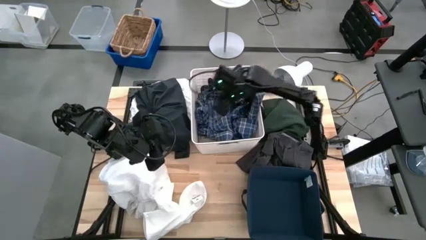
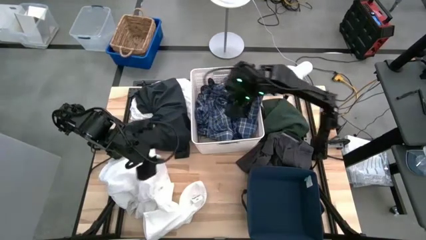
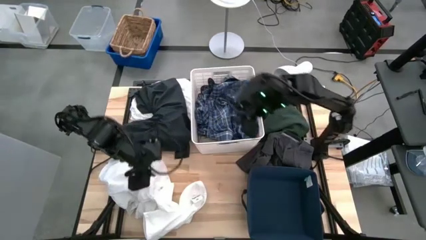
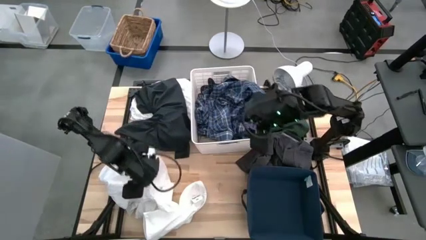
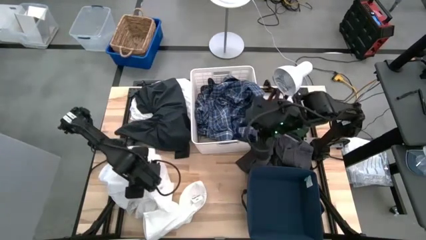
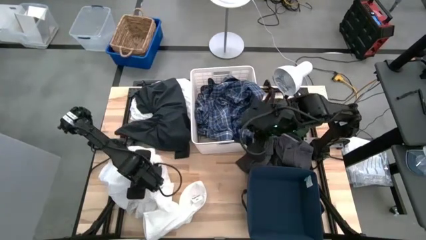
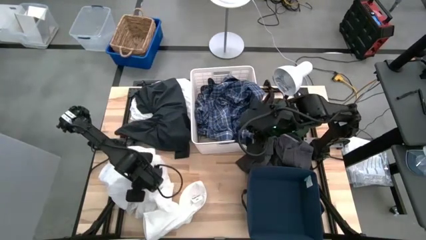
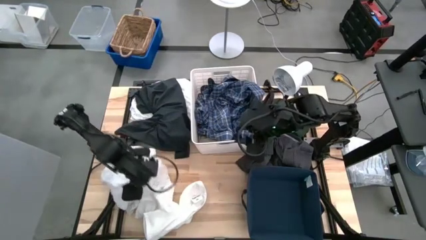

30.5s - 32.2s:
Task: Sort clothes
Put the white long sleeve polo into the blue laundry bin

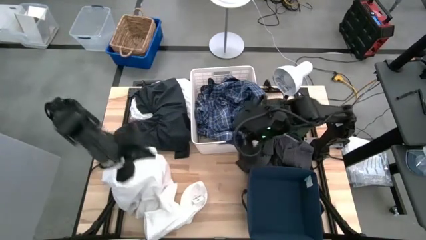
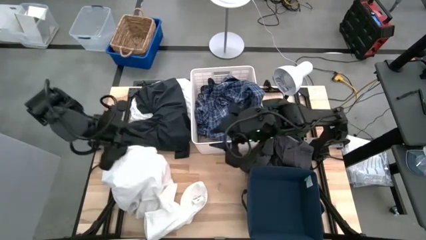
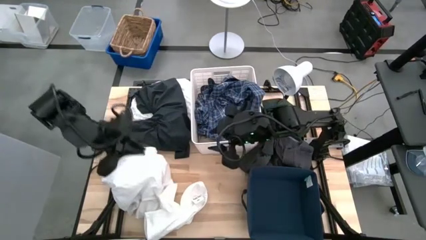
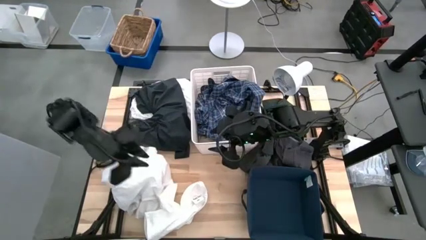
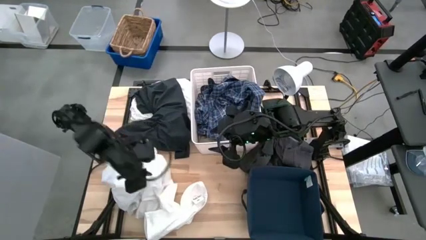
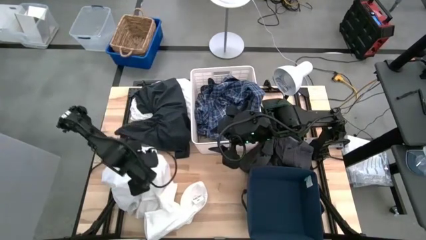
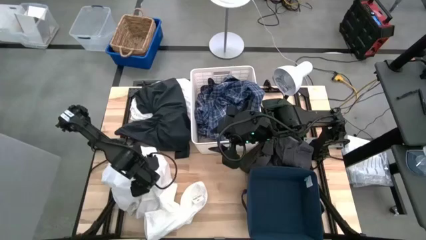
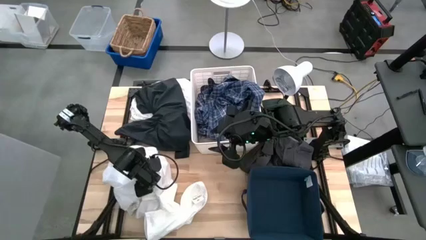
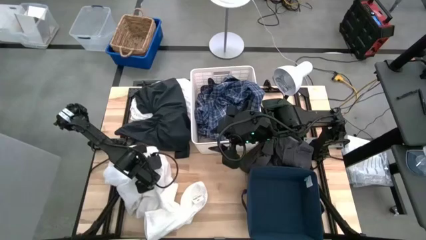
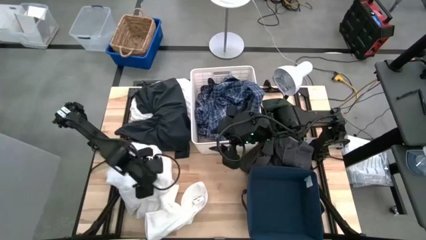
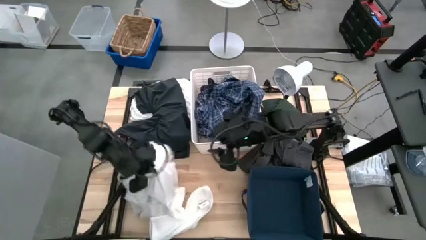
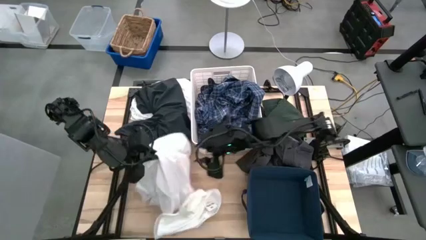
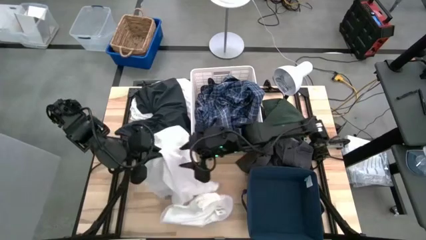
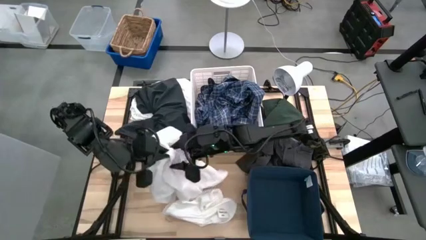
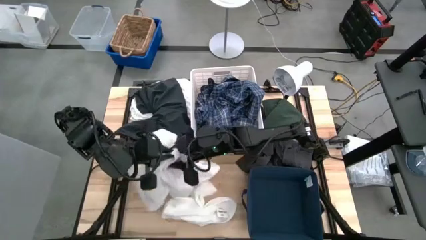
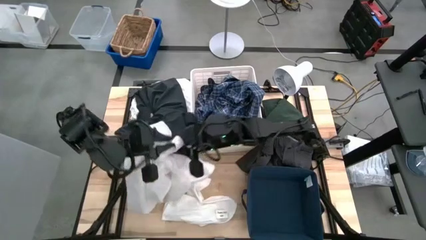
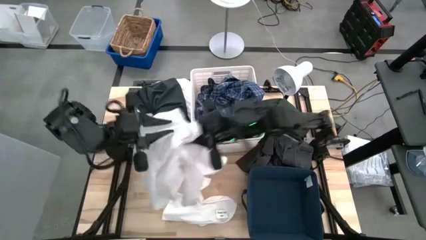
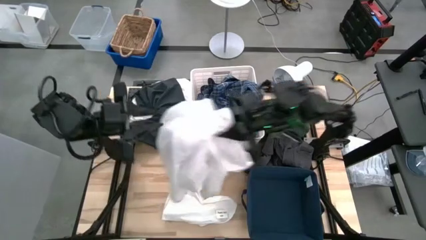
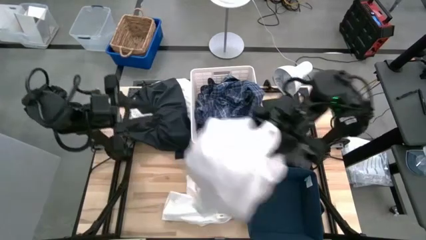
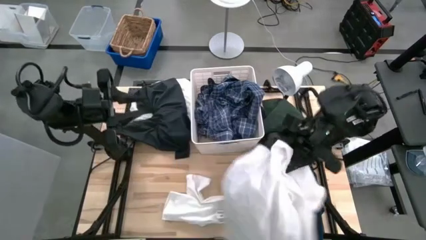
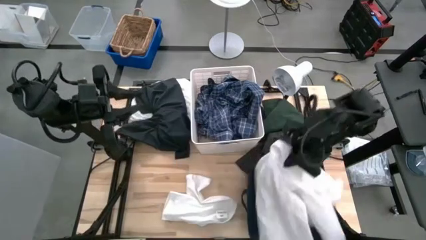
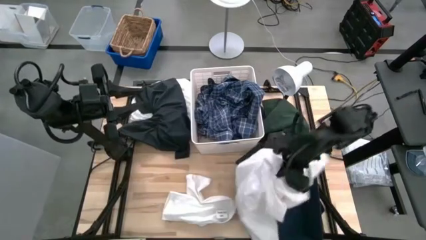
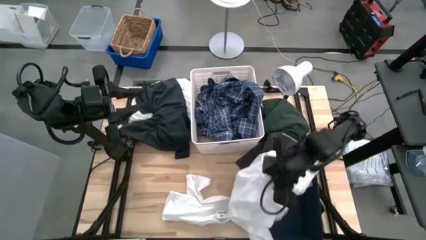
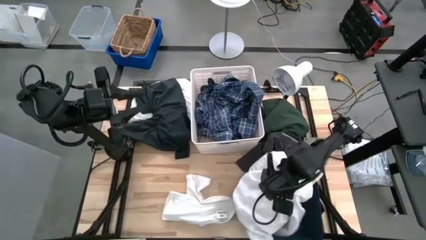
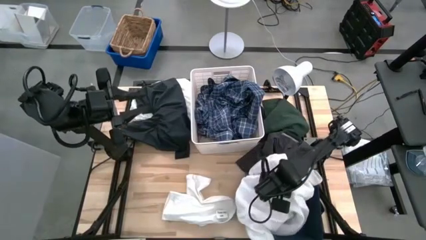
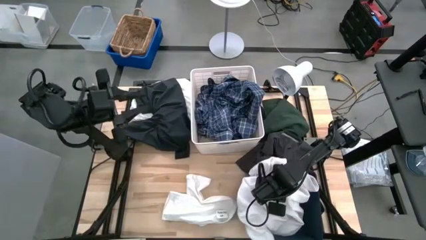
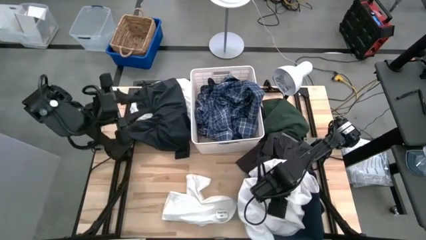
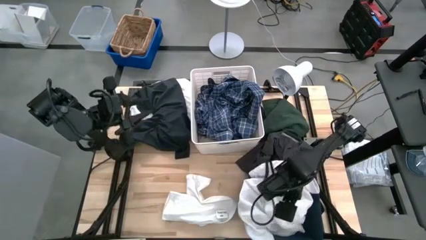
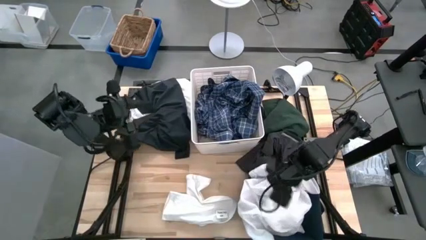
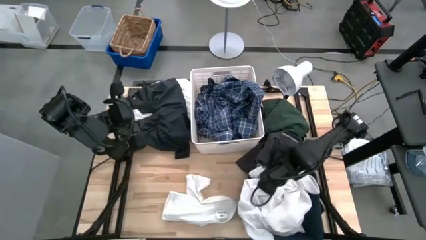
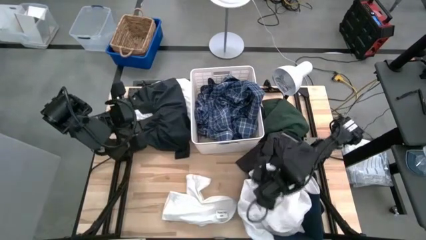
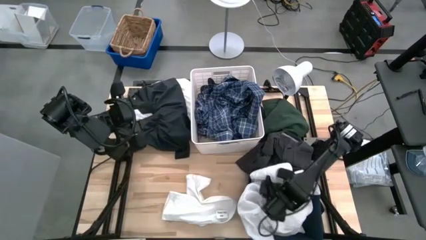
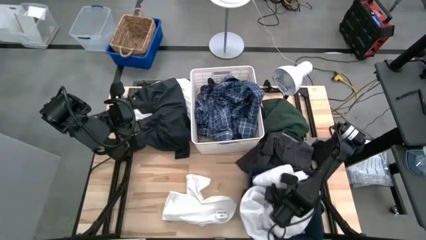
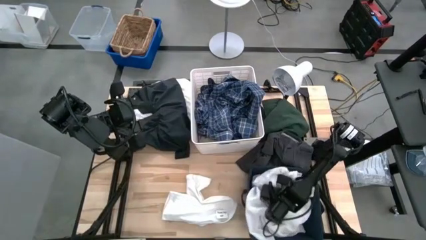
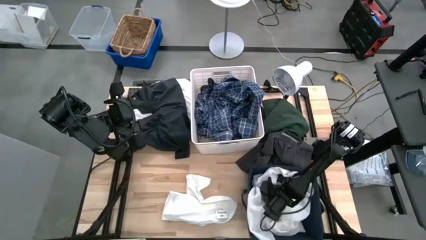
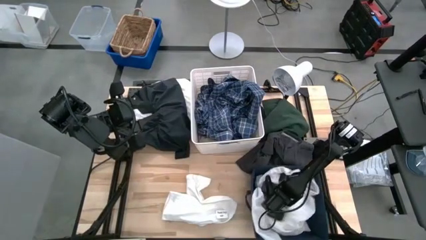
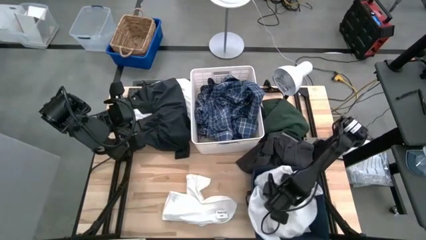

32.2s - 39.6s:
Put the white long sleeve polo into the blue laundry bin

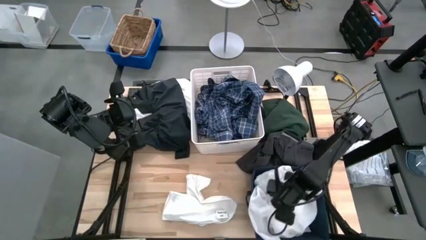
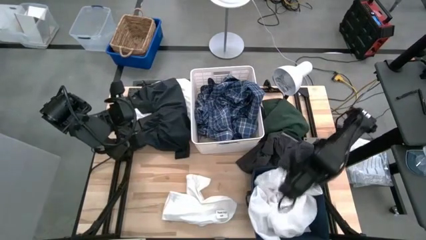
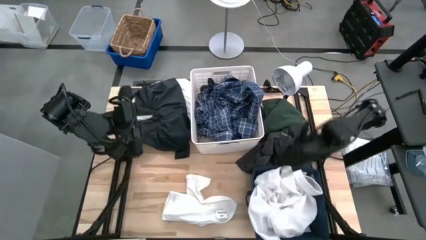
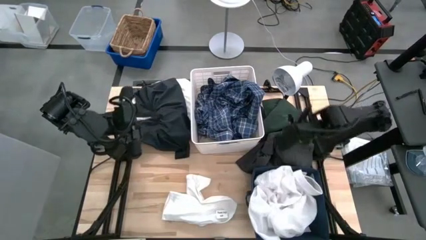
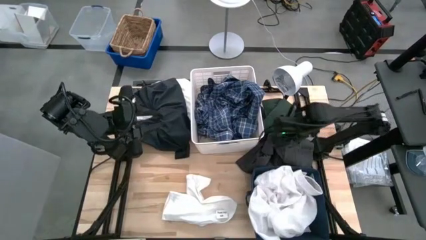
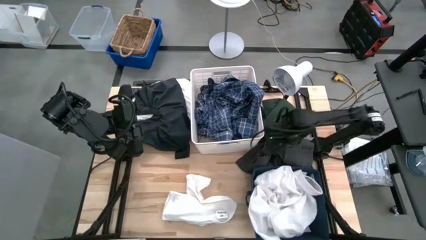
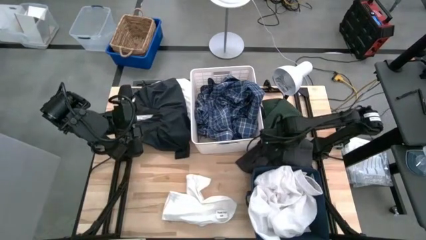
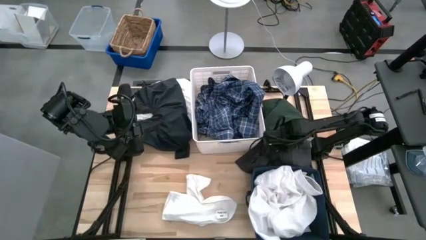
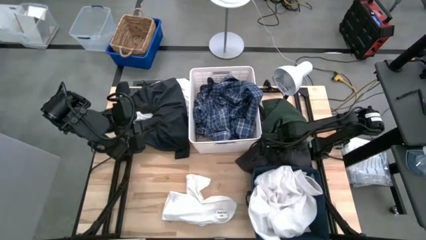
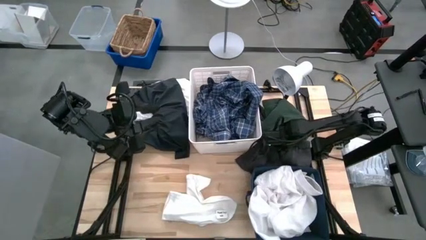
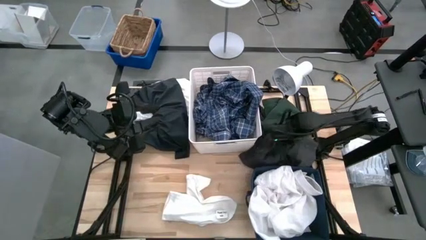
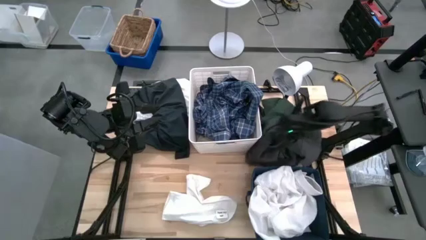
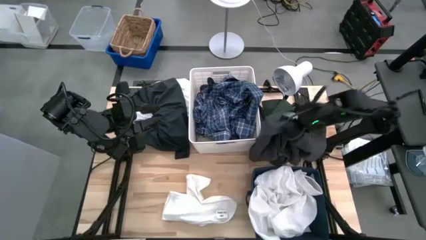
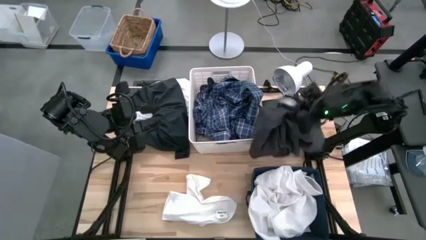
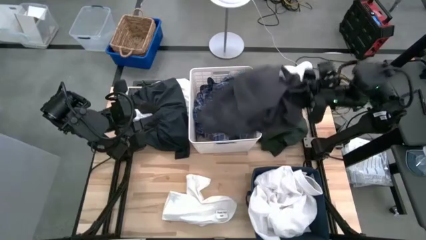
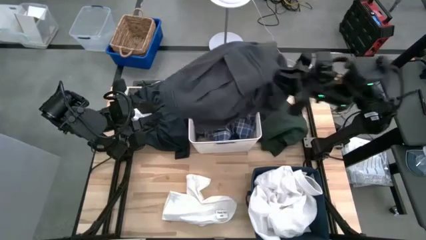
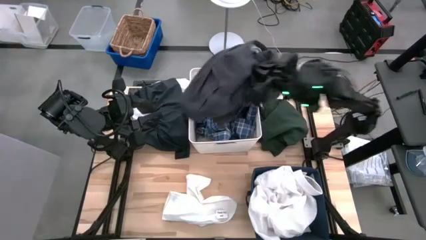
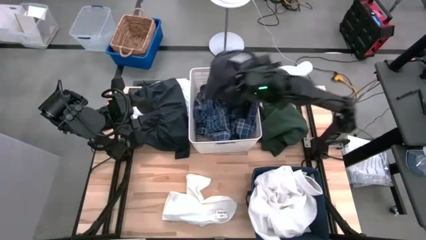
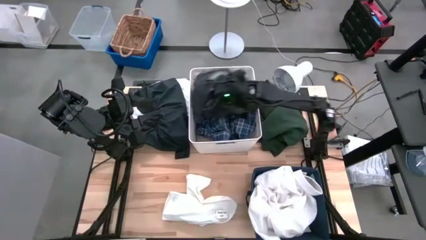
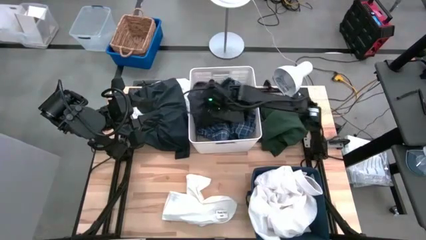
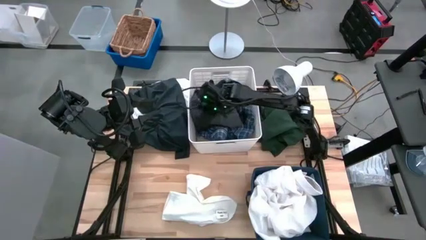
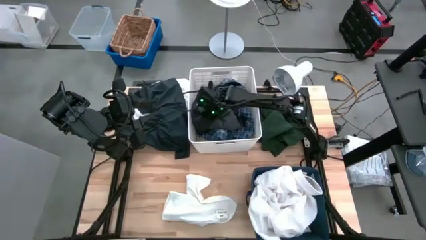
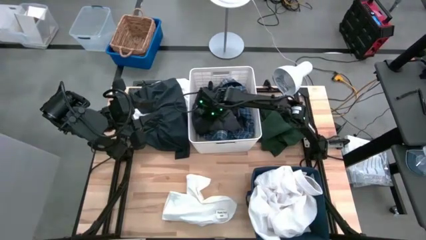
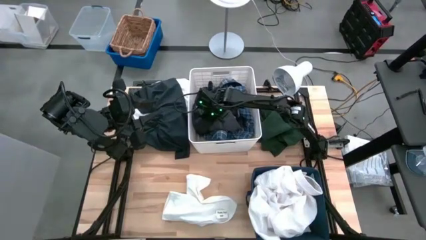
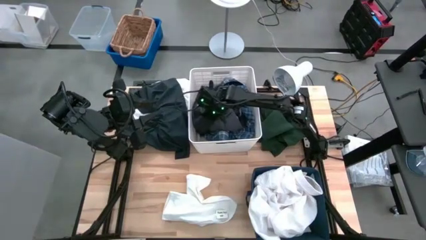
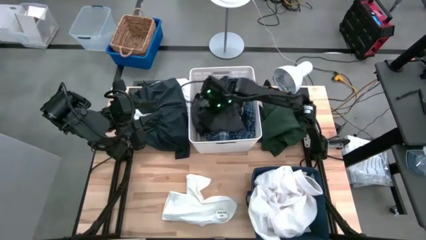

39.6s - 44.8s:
Put the gray shorts into the white laundry bin
